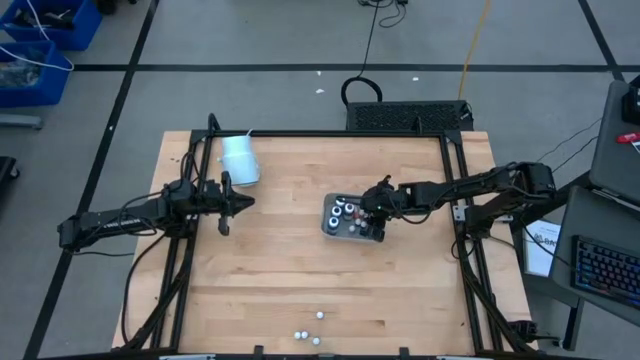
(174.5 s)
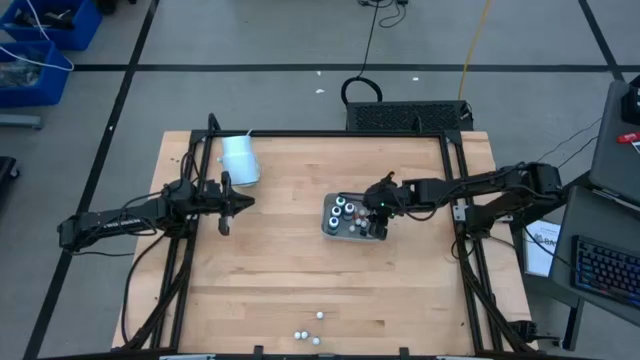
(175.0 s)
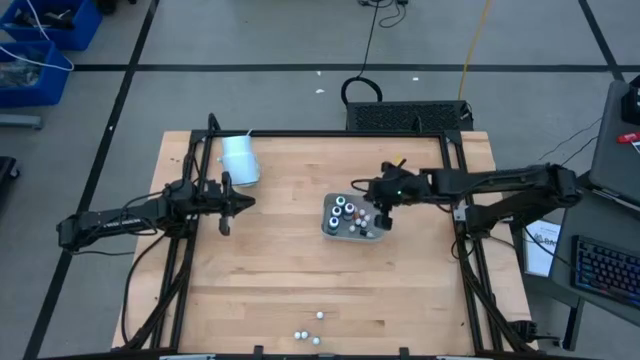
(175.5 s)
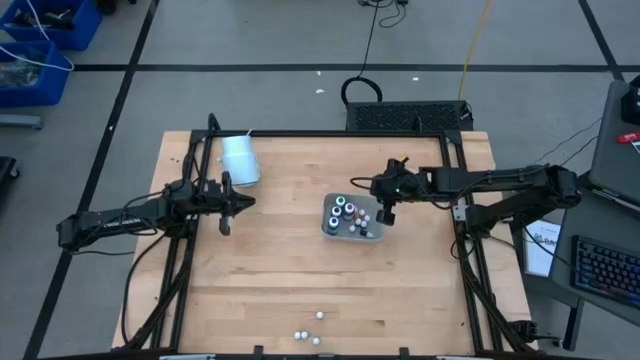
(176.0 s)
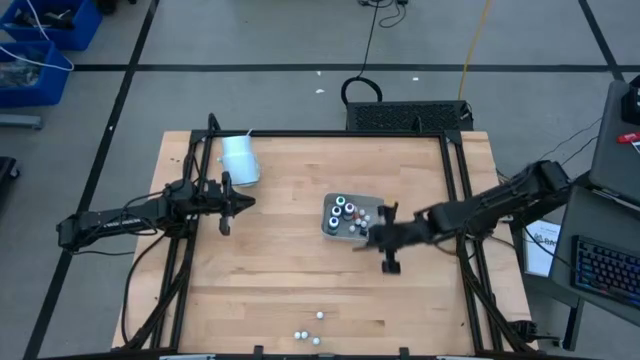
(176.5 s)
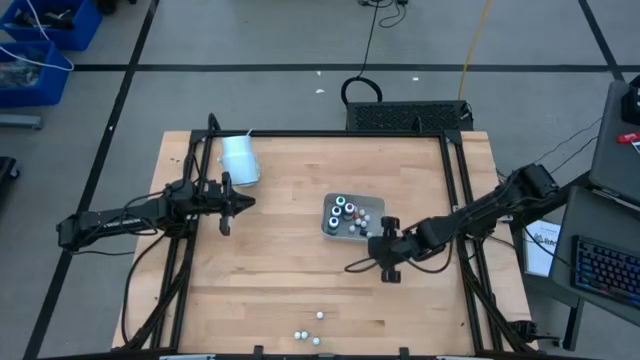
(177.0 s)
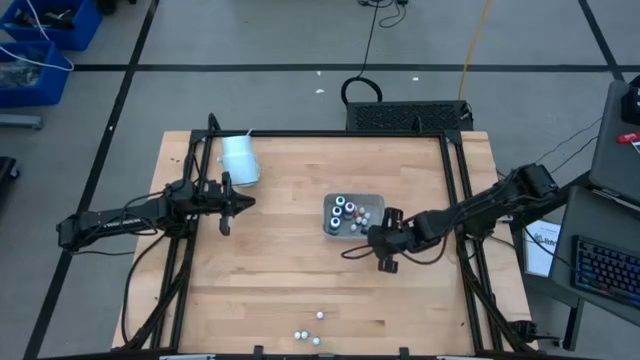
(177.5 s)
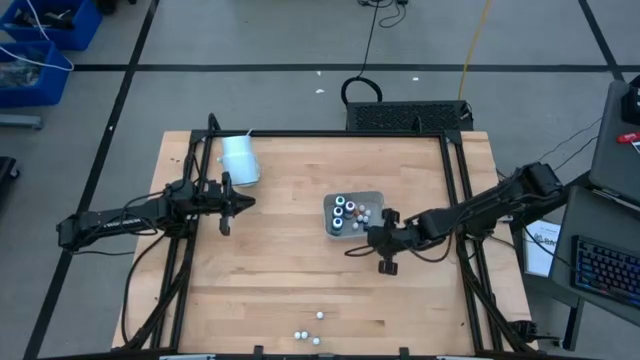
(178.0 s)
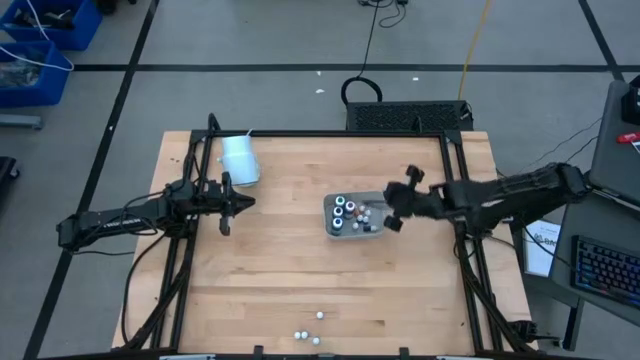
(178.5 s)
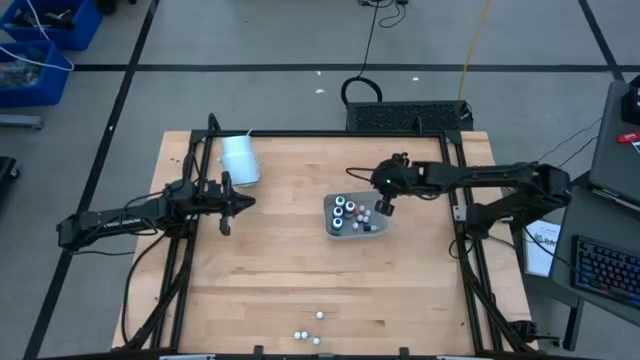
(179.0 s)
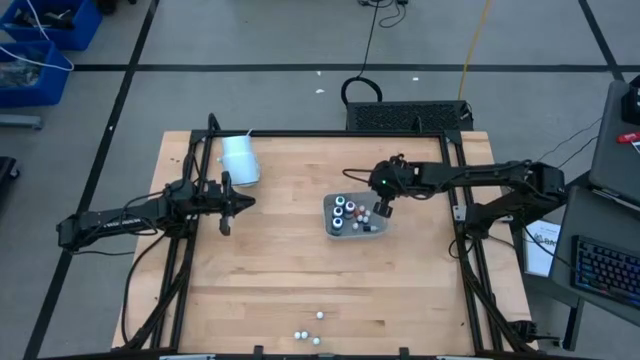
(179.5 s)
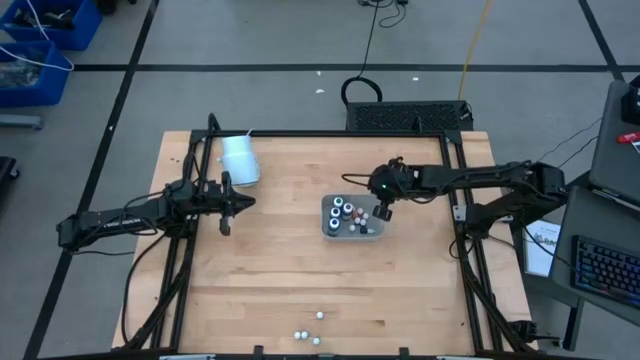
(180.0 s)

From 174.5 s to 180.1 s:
Task: Pick & Place food coloring
Adjust the bin

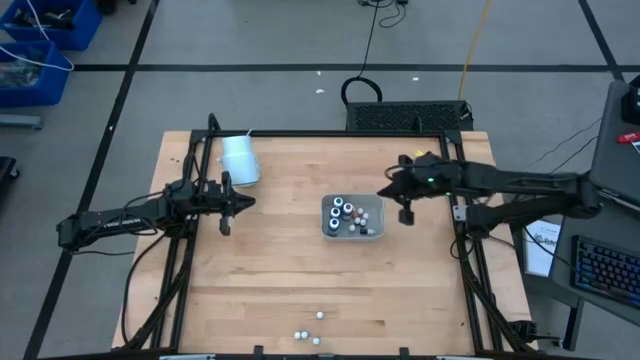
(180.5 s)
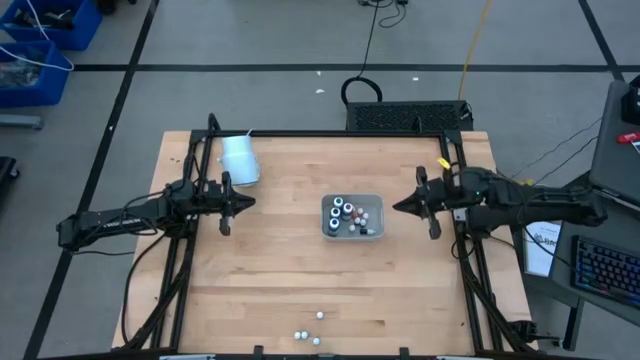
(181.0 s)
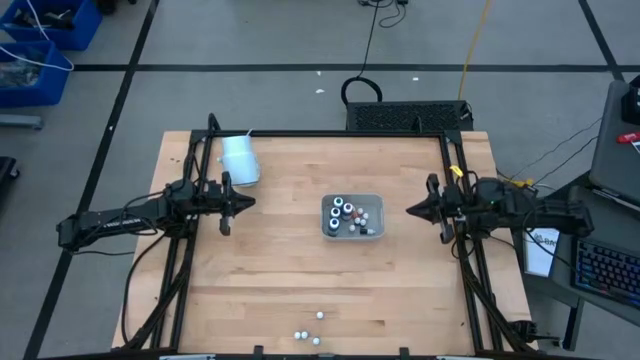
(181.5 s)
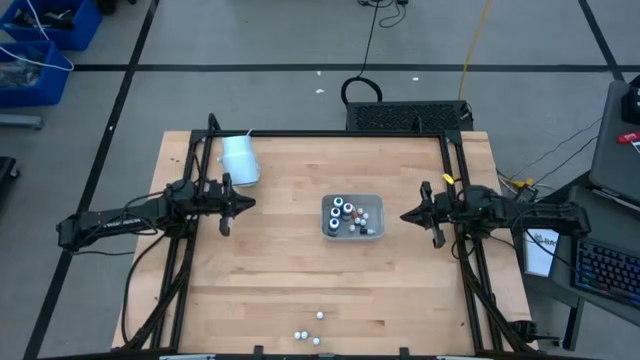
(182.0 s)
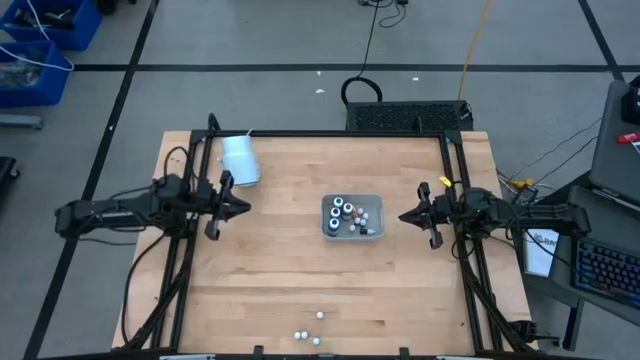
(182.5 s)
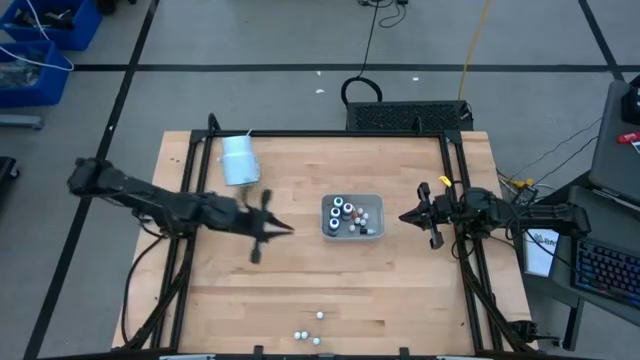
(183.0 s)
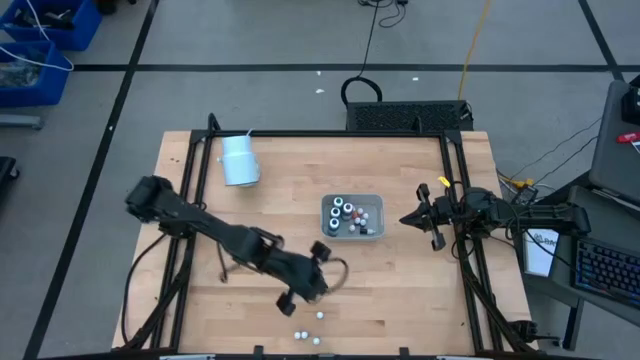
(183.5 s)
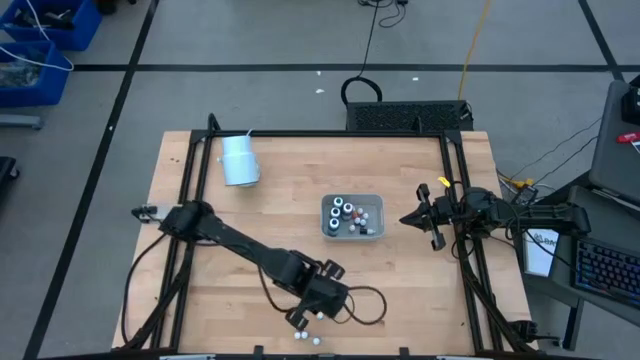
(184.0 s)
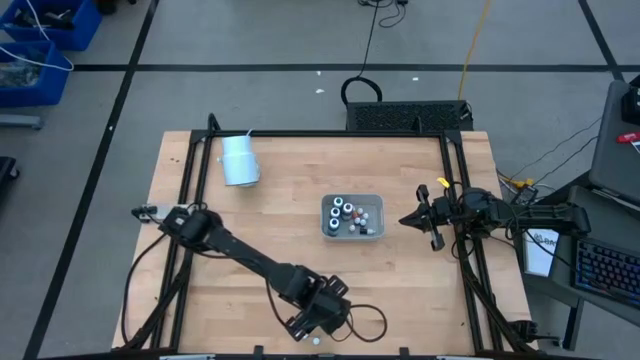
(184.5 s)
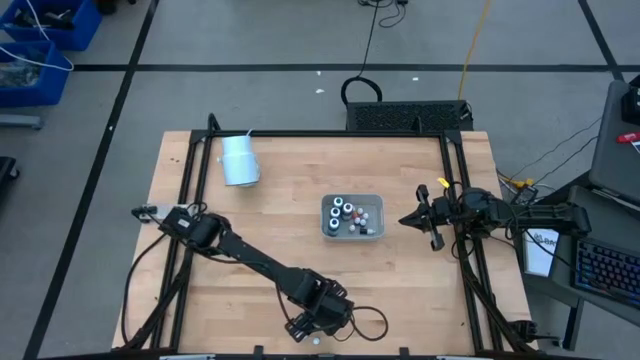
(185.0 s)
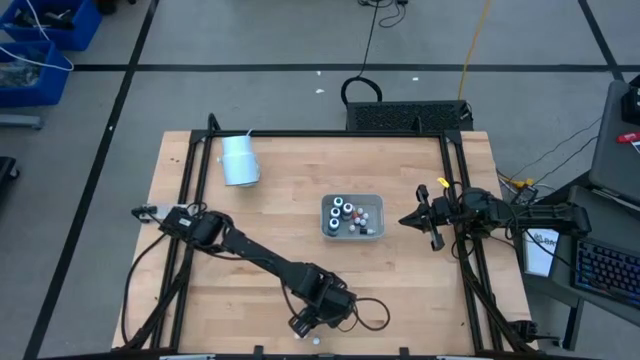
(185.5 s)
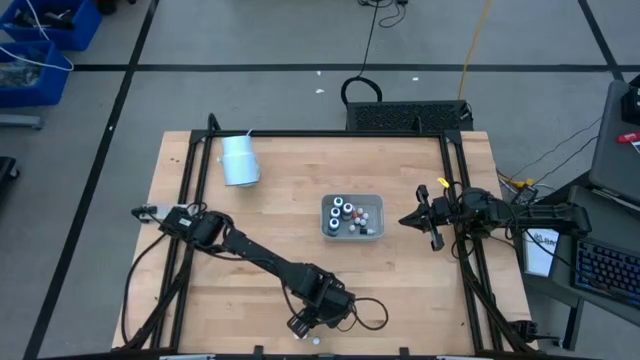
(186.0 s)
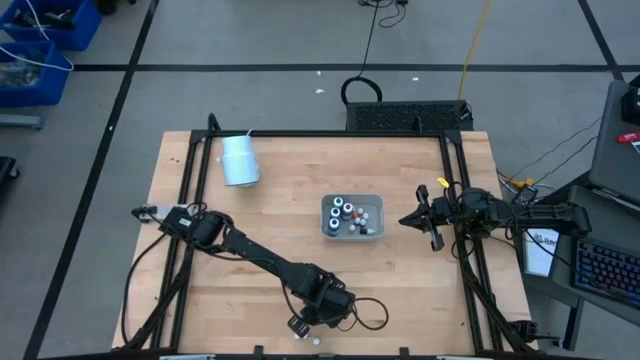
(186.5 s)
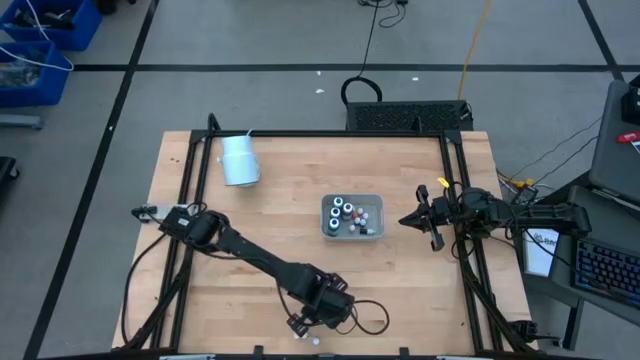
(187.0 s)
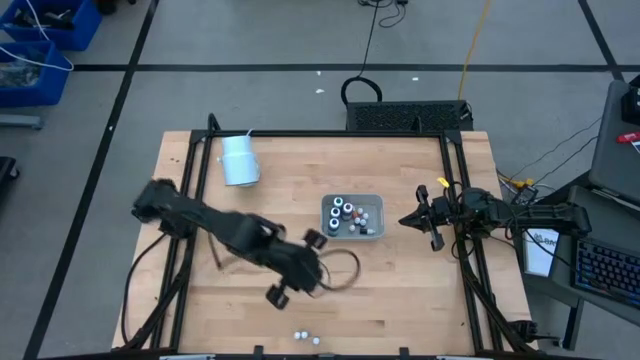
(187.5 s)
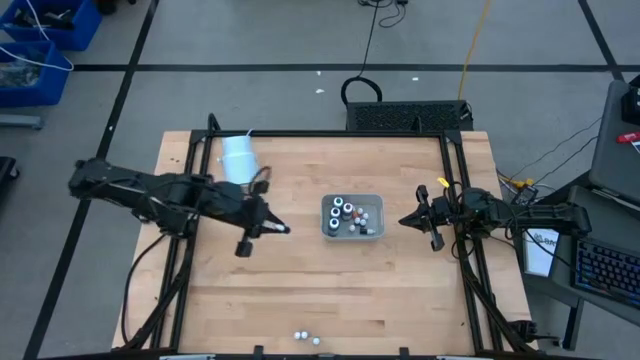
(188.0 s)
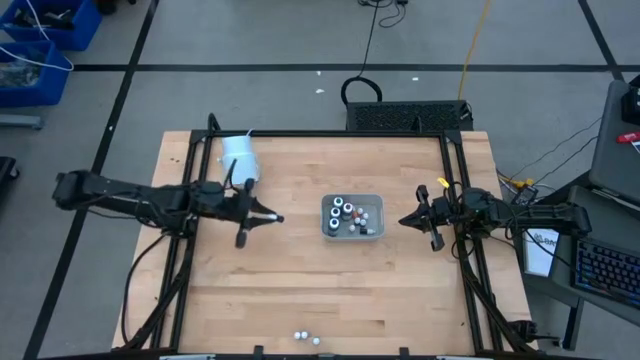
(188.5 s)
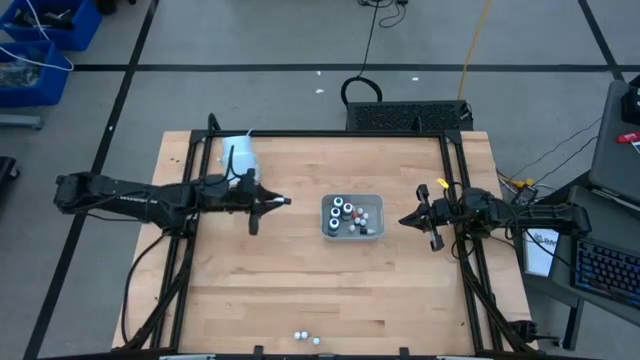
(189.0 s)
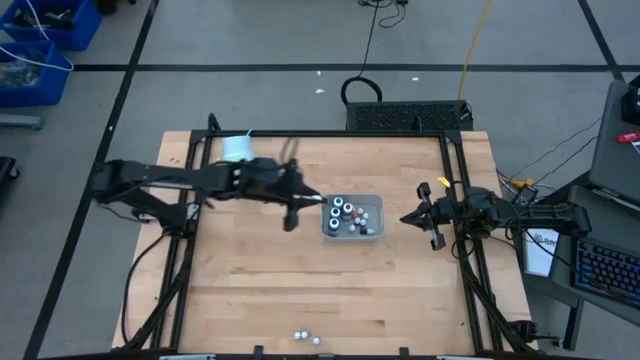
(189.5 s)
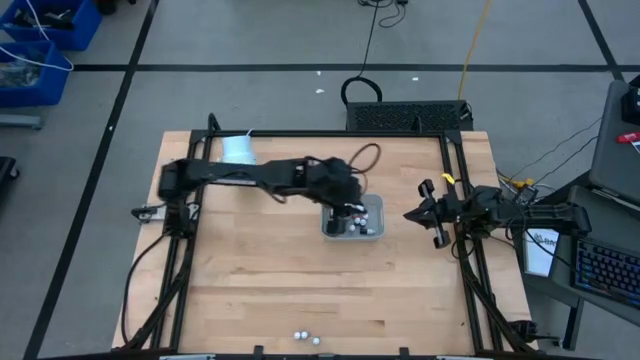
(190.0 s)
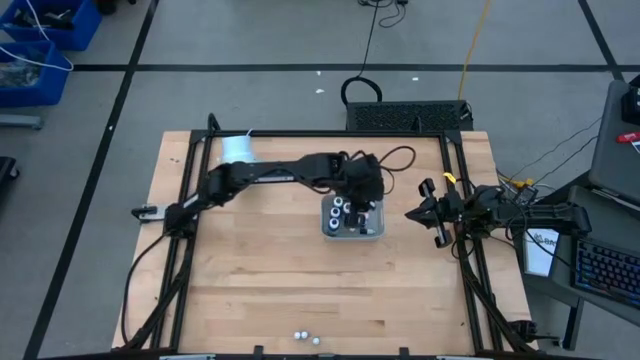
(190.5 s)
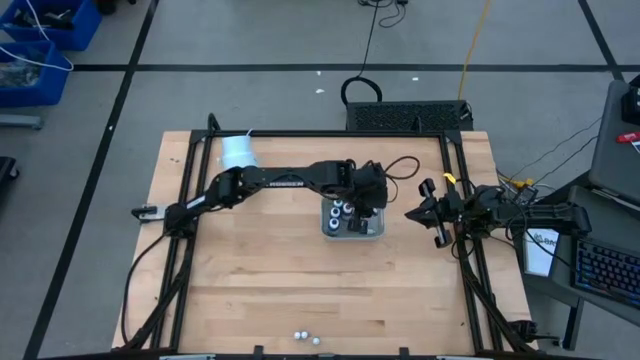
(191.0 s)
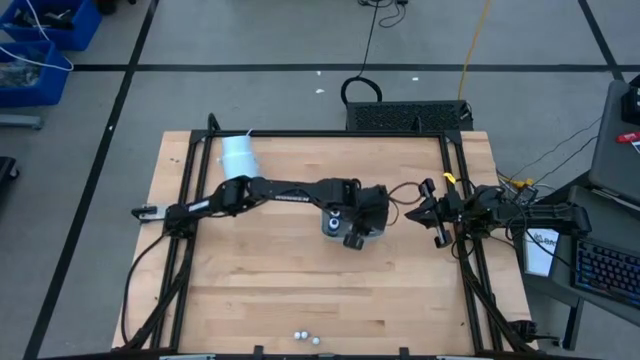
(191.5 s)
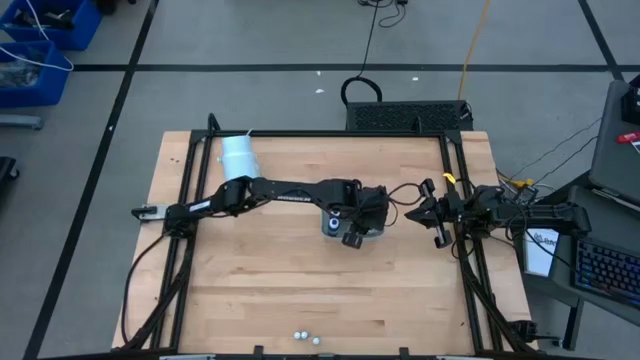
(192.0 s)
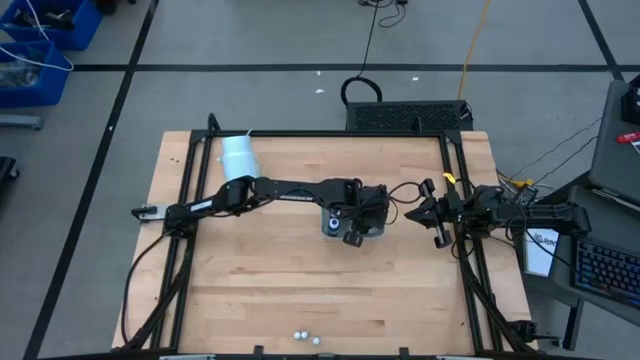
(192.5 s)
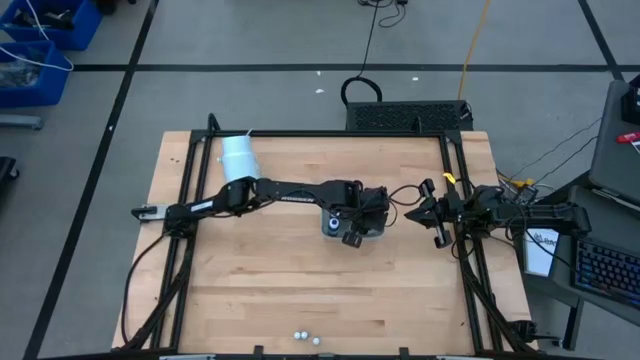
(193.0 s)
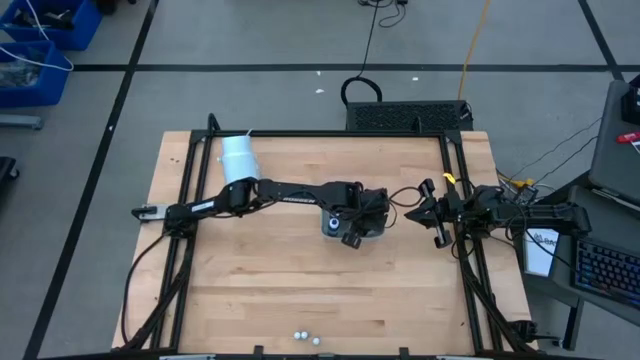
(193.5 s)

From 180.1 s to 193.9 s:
Put the small violet food coloring bottle into the bin
